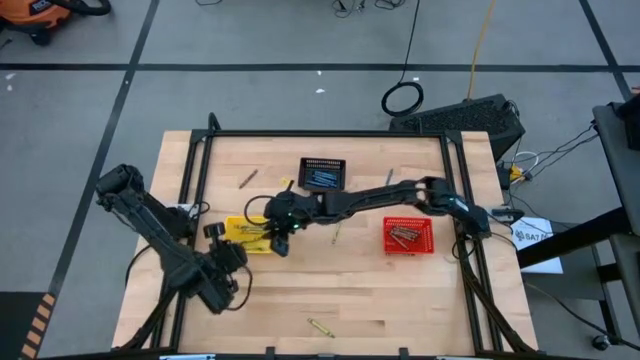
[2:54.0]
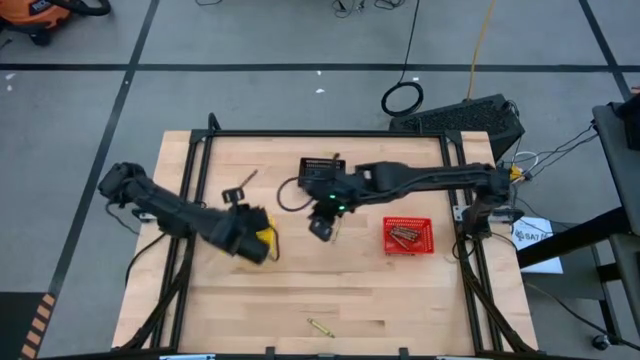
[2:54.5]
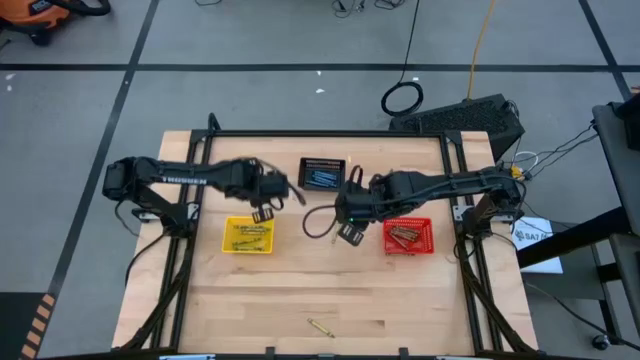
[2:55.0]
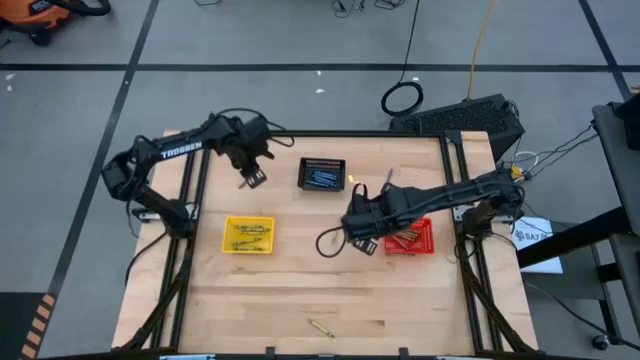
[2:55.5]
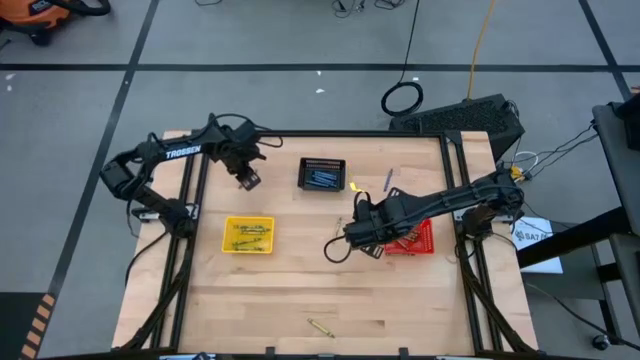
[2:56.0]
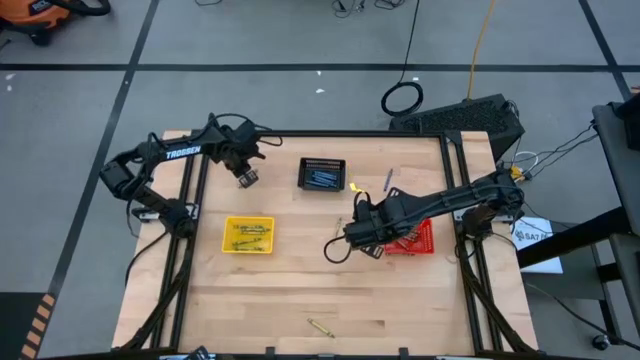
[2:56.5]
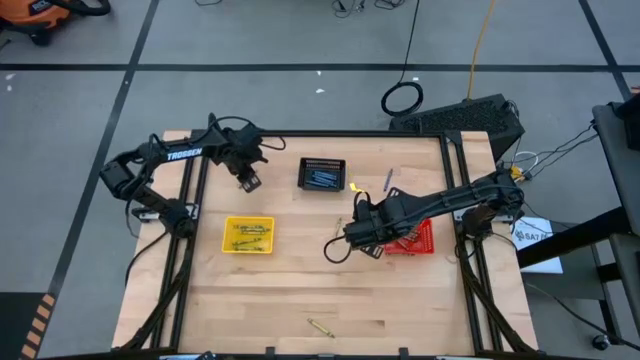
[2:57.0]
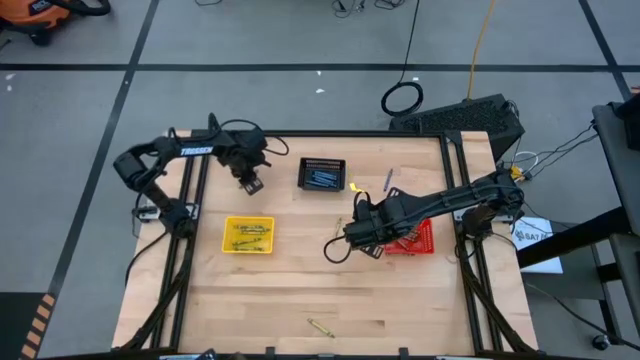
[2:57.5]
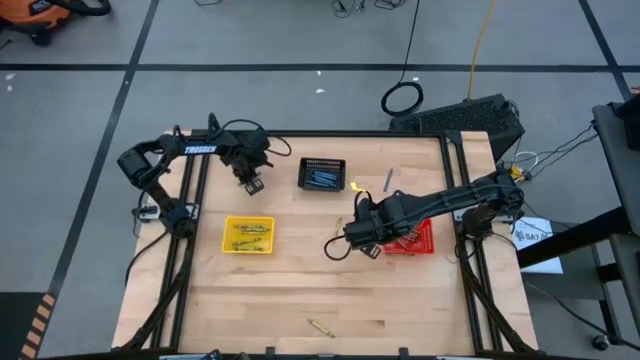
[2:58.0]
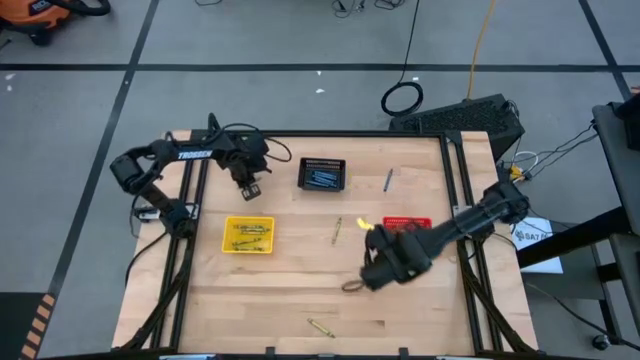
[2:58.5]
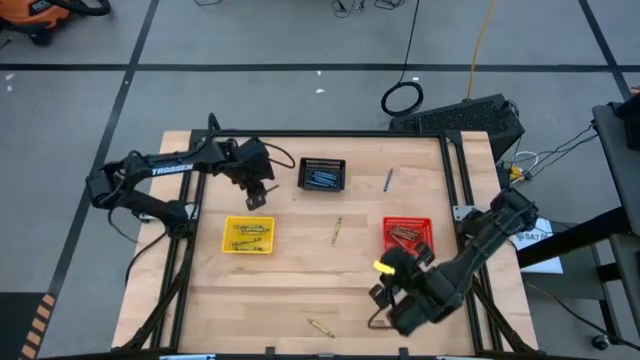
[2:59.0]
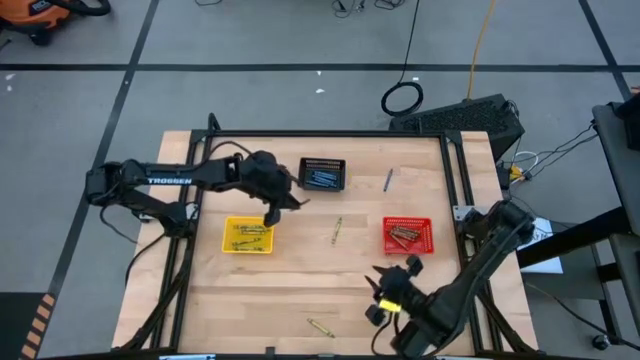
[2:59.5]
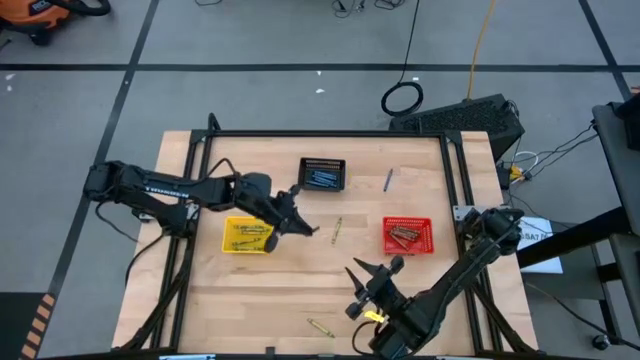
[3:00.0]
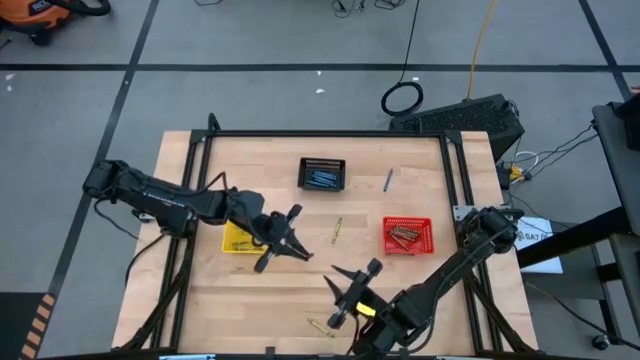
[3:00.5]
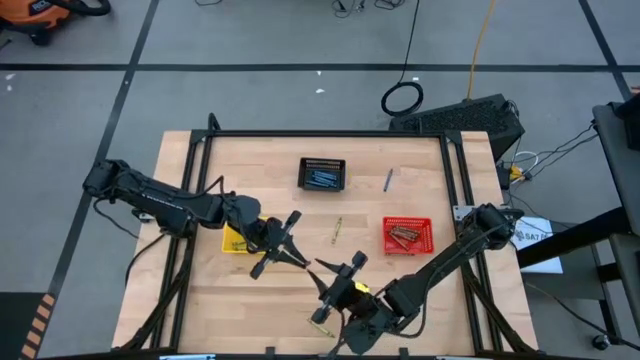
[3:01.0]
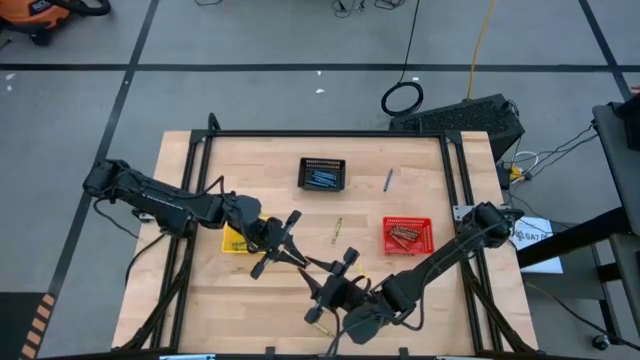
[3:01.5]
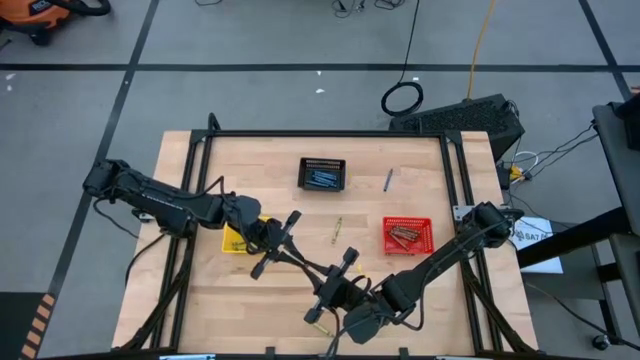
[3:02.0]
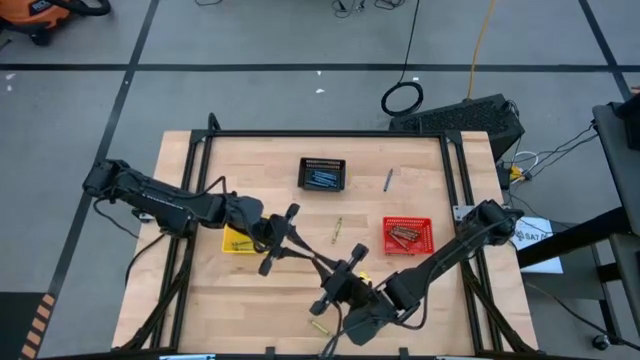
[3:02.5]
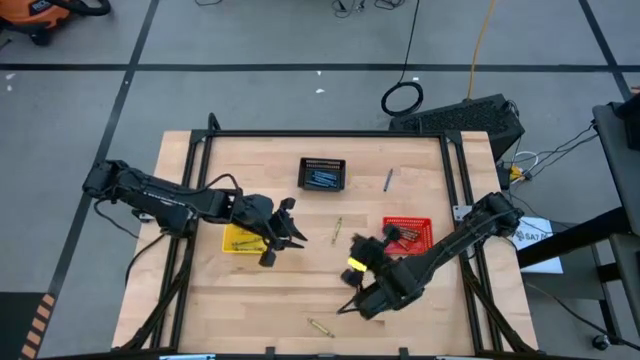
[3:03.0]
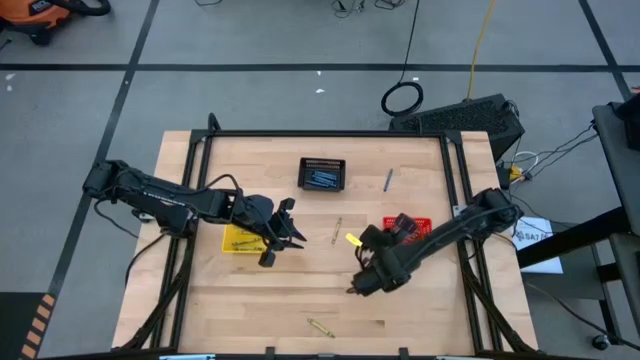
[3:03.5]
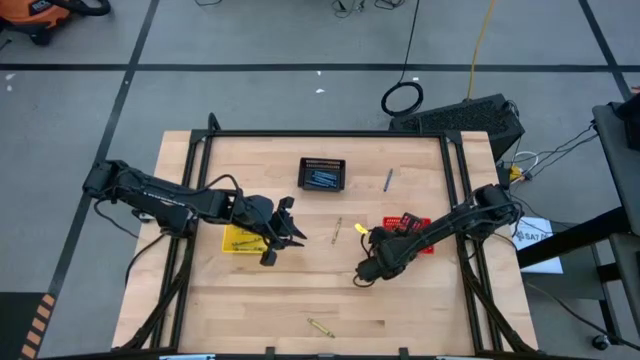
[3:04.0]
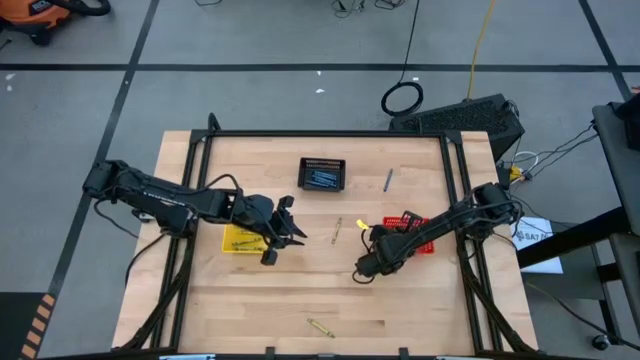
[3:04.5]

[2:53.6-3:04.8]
Task: Sort crayons
Put the brown crayon into the red bin

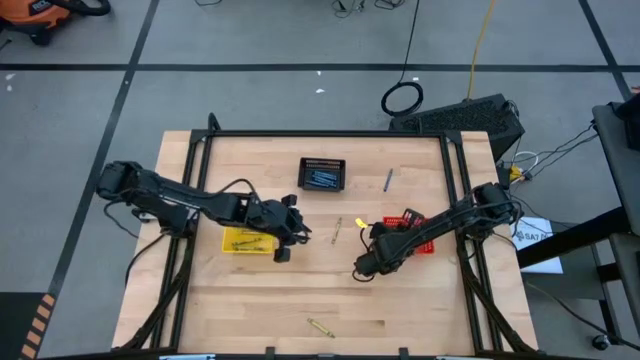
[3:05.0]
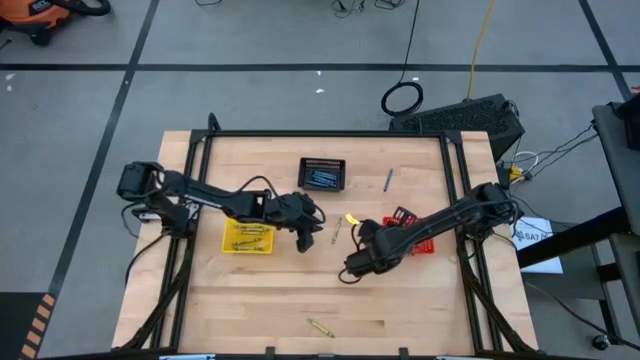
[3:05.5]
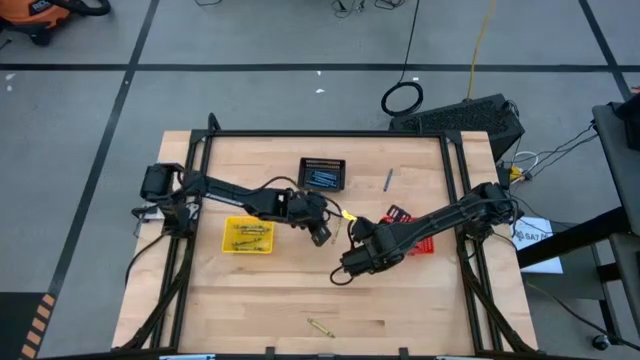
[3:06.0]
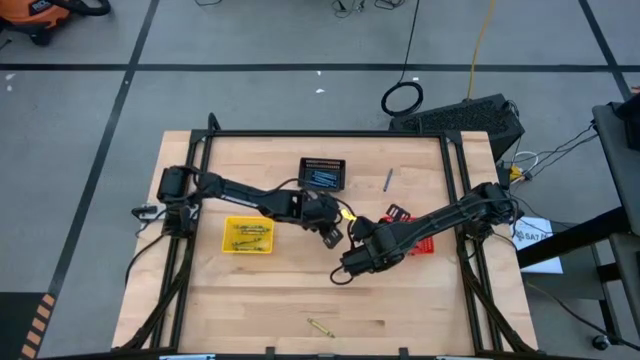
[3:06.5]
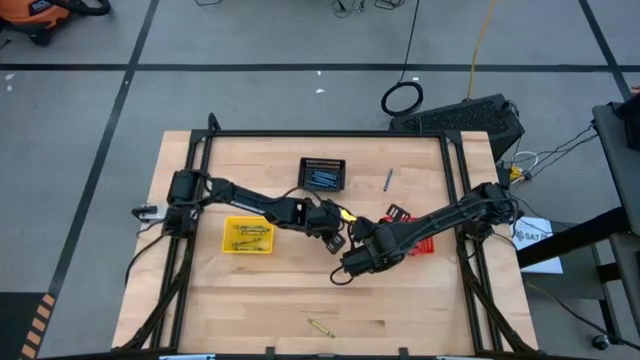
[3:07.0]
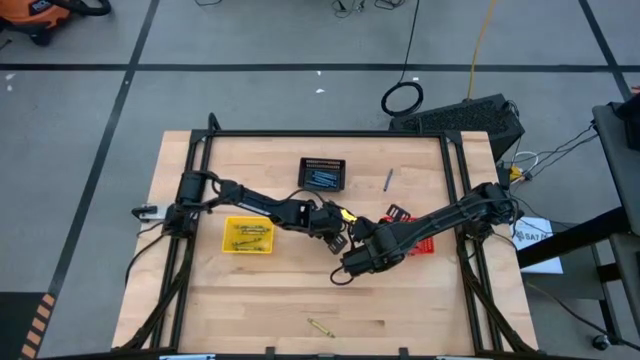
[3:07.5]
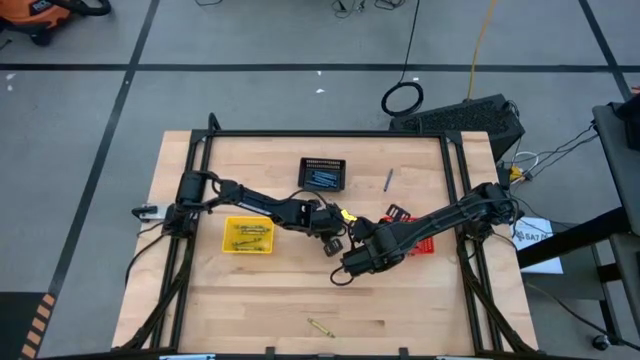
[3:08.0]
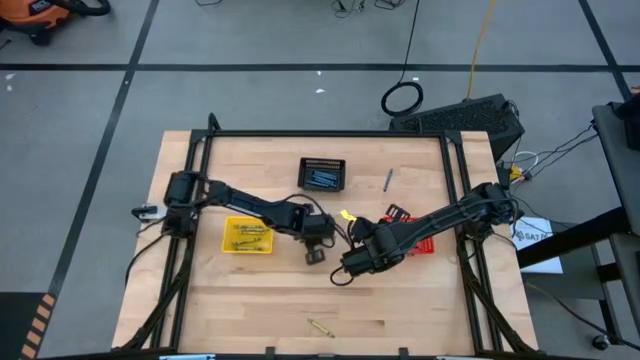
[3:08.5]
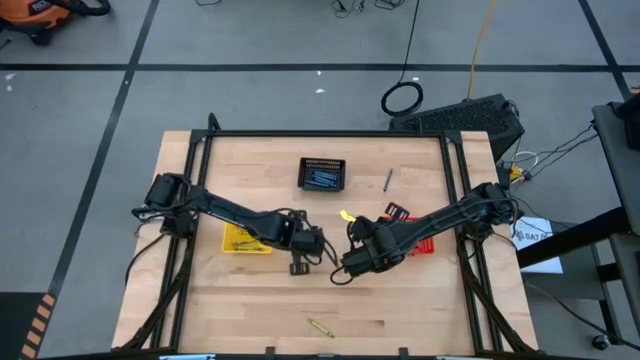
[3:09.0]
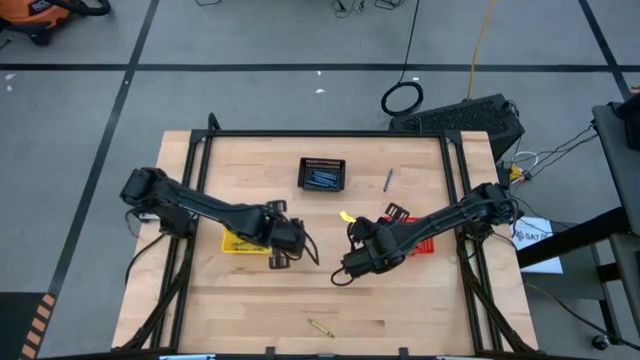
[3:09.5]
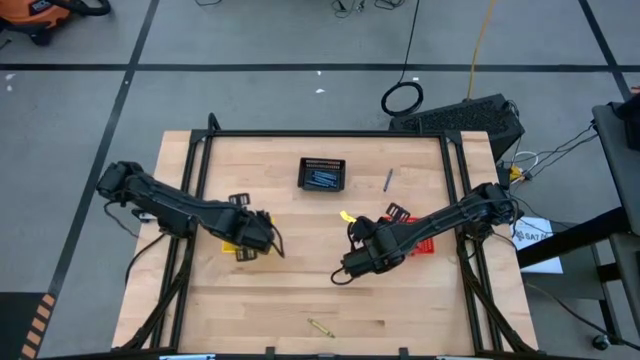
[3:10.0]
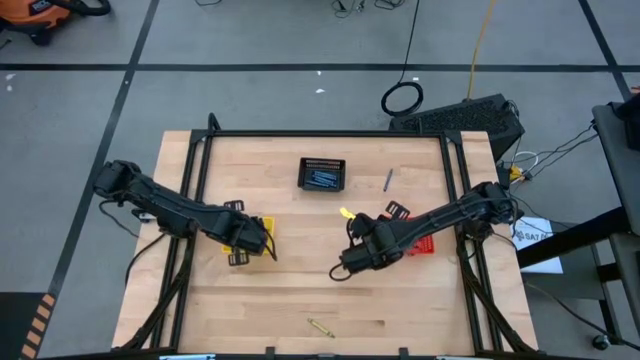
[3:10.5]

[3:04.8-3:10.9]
Put the green crayon into the yellow bin

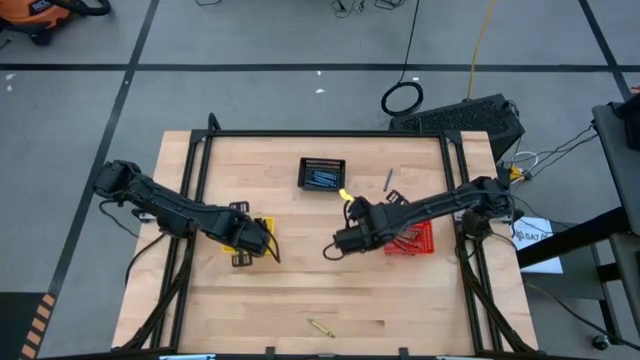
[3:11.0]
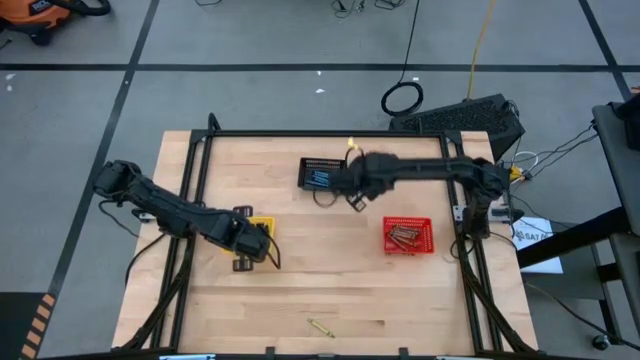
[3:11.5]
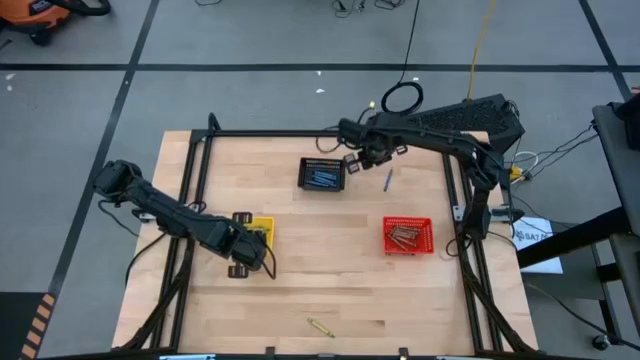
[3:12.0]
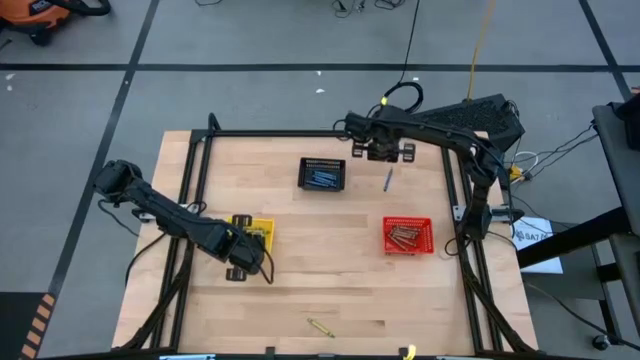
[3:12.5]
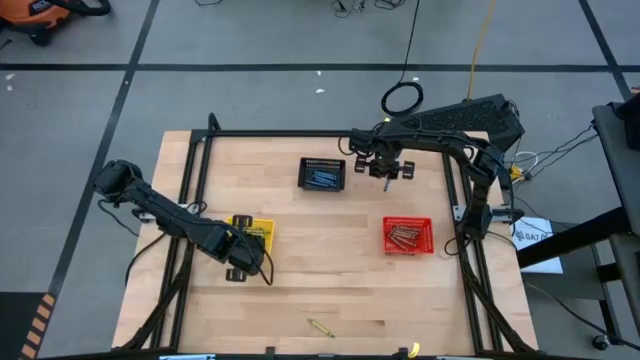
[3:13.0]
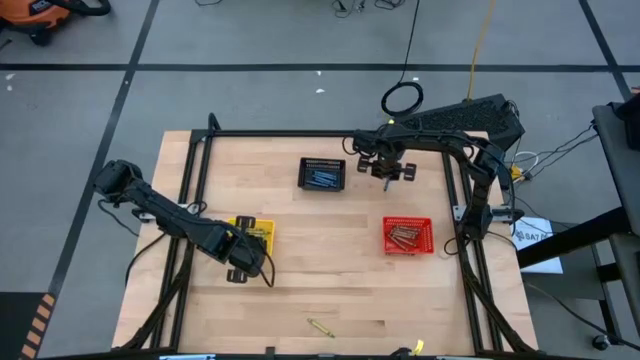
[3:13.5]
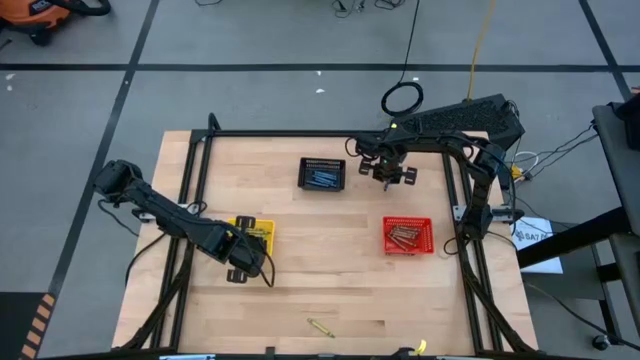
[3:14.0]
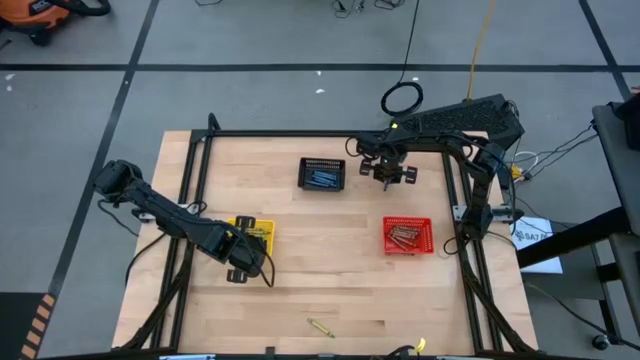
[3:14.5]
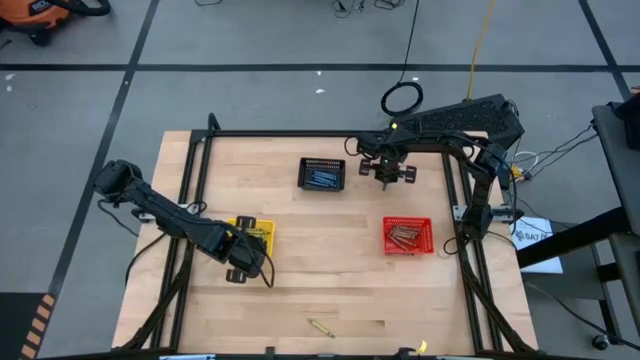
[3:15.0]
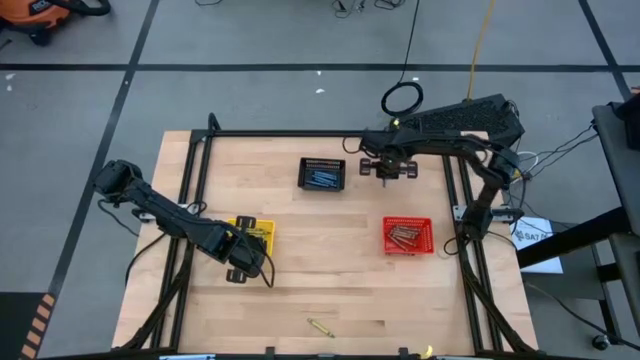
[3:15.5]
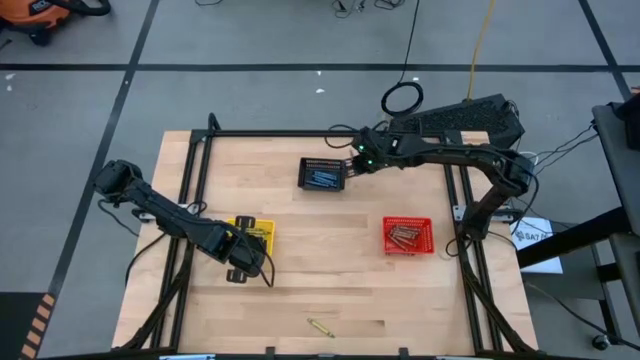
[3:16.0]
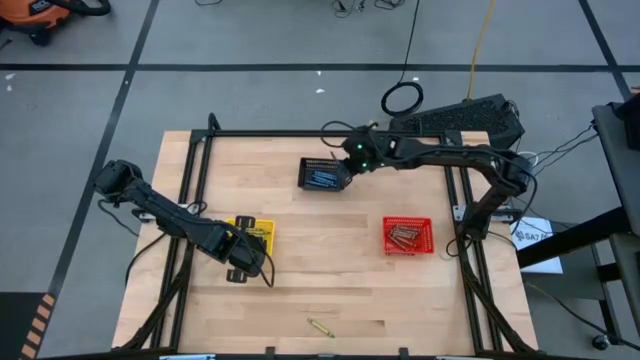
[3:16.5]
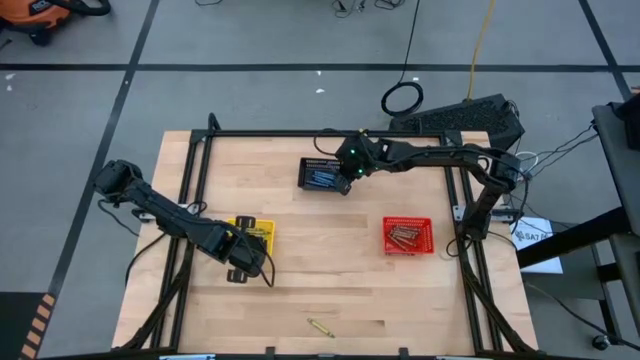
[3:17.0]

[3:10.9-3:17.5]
Put the blue crayon into the black bin
